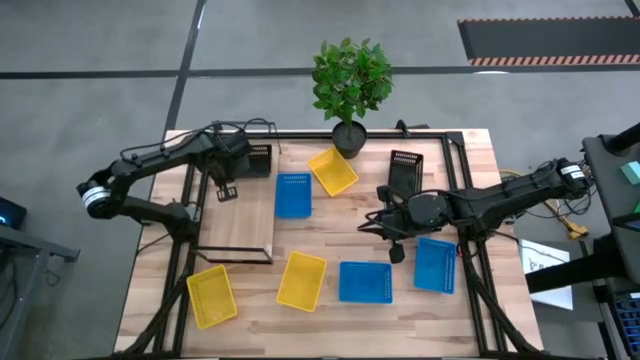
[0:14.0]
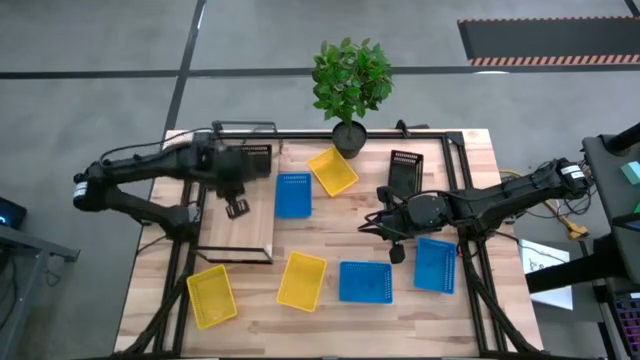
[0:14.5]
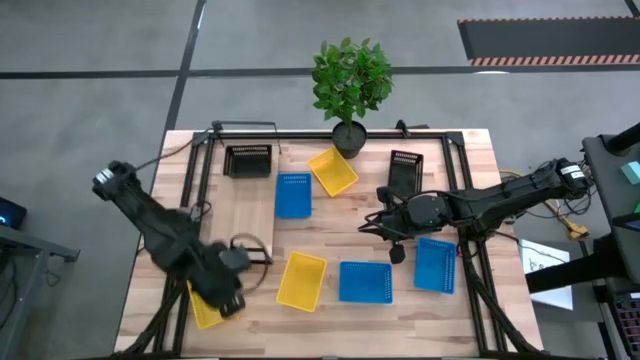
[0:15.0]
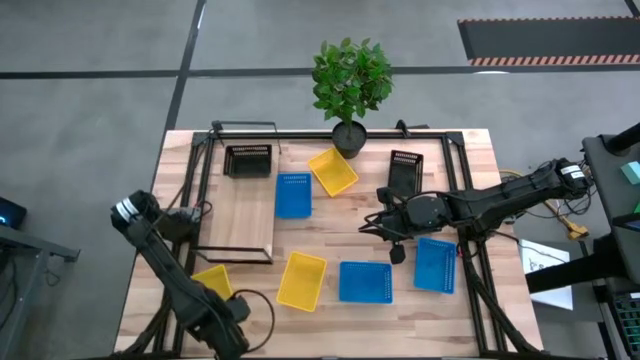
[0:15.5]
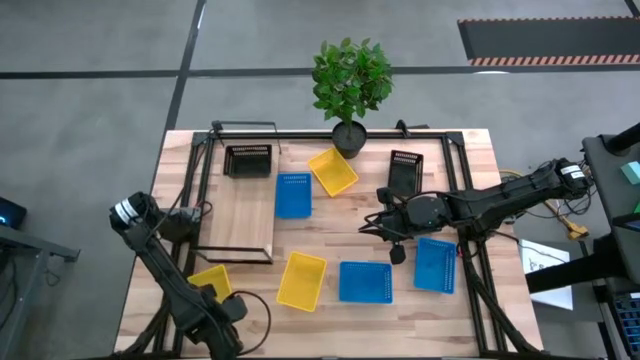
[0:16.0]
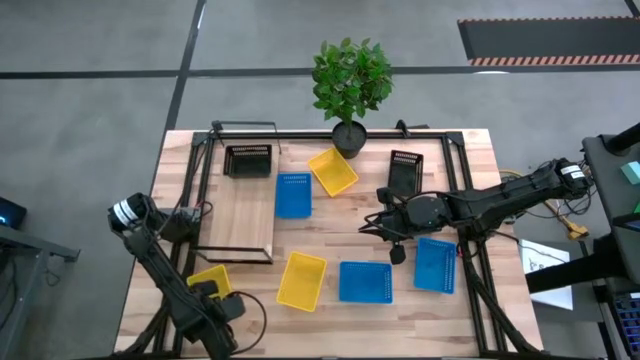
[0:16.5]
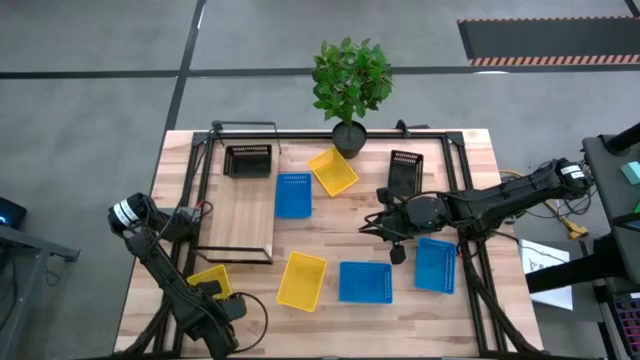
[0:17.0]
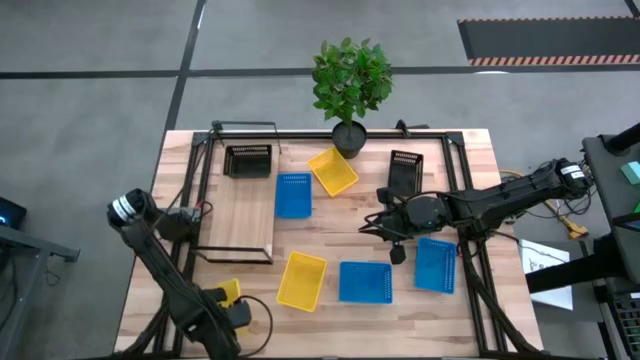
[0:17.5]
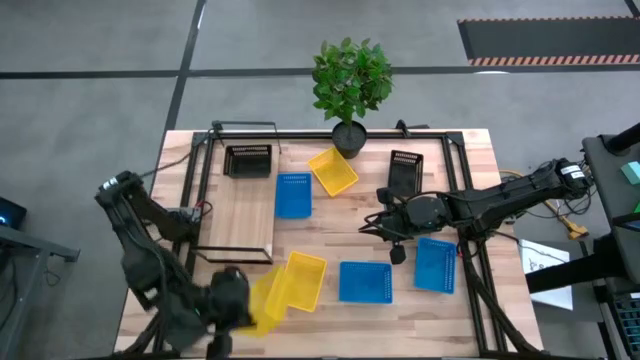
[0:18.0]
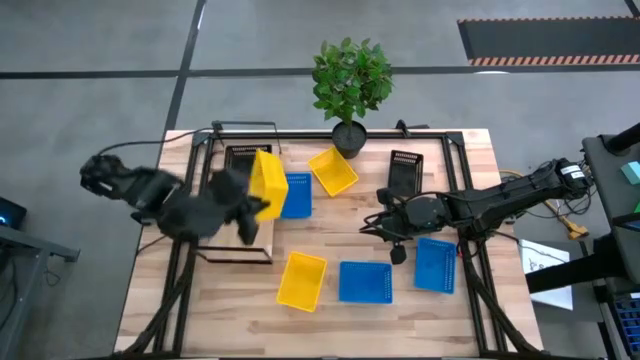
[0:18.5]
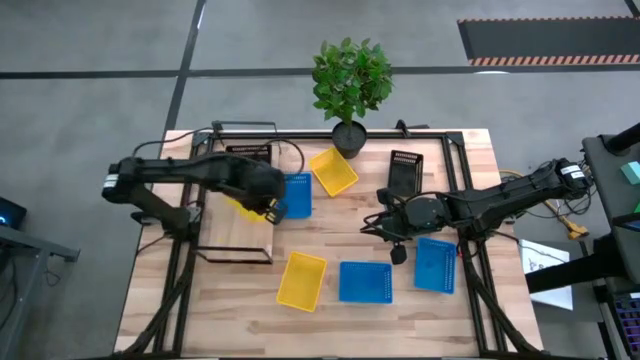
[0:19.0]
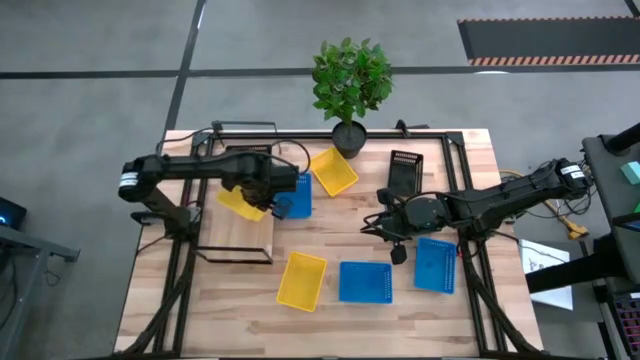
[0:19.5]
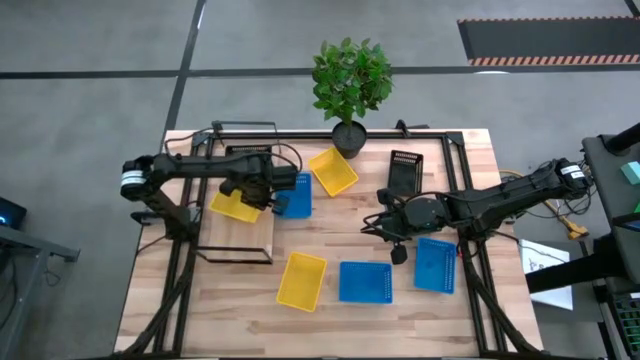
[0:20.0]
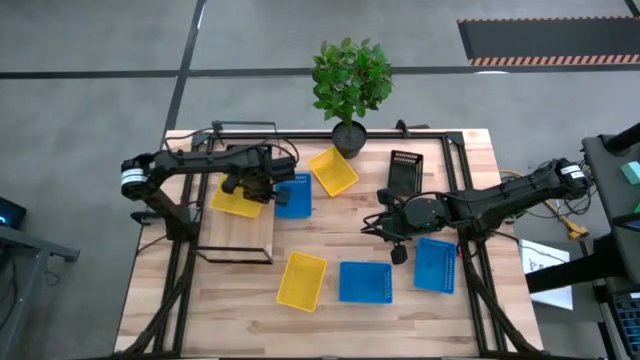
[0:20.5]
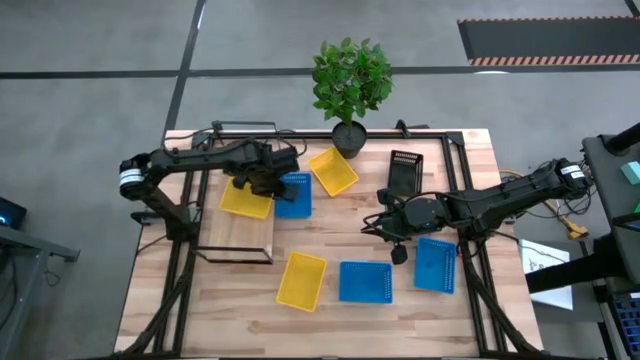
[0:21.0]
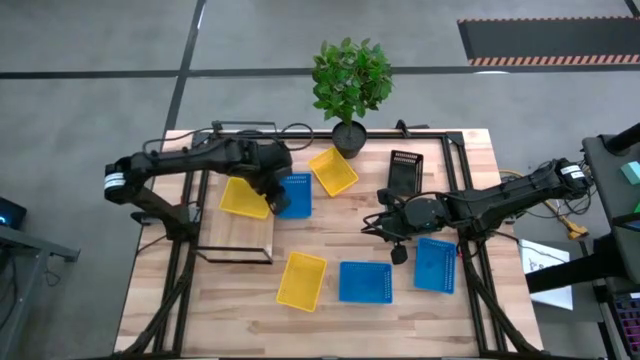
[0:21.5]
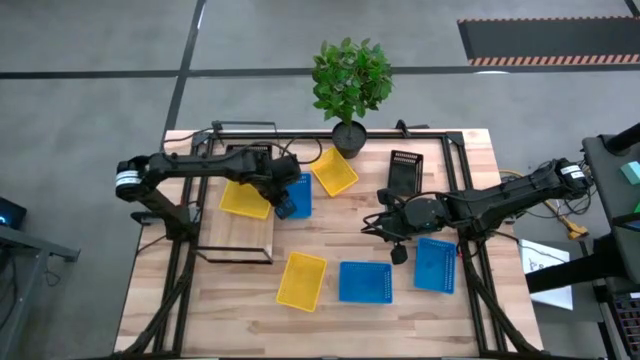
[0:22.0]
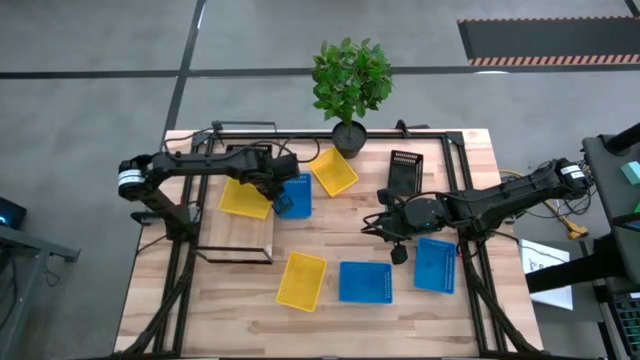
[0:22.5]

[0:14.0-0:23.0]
Put the bottom left yellow basket on the shelf

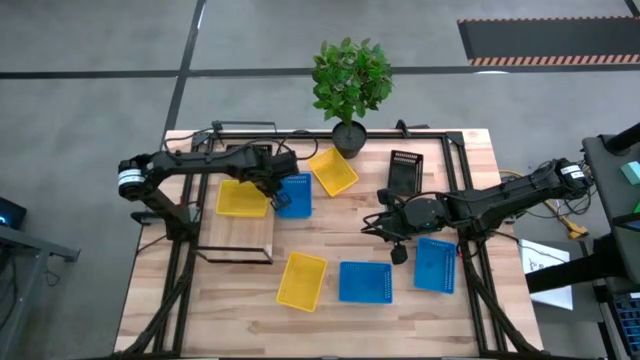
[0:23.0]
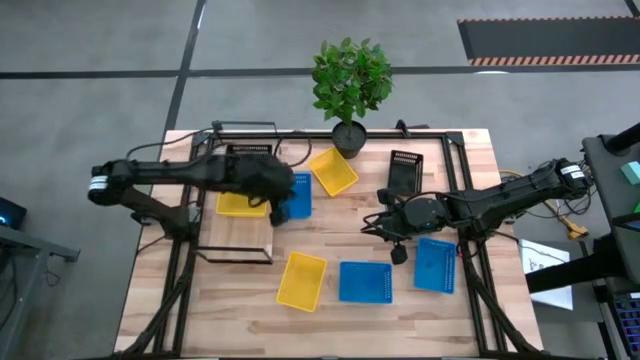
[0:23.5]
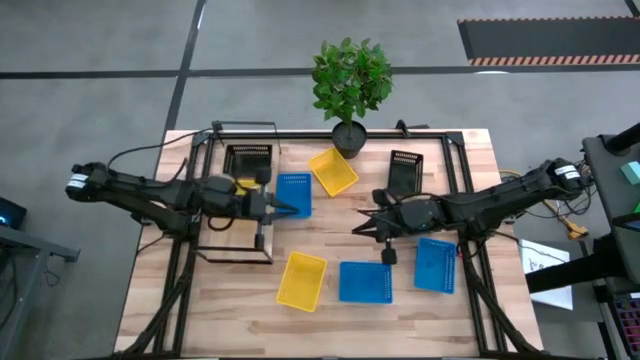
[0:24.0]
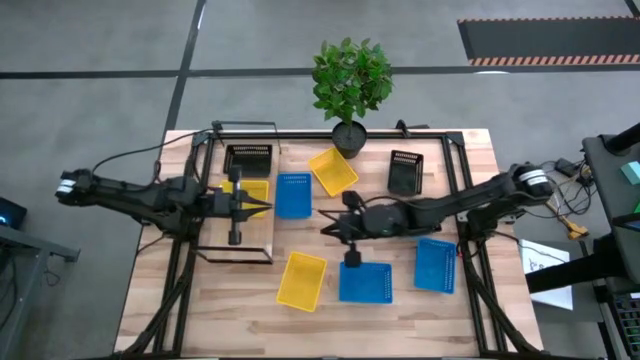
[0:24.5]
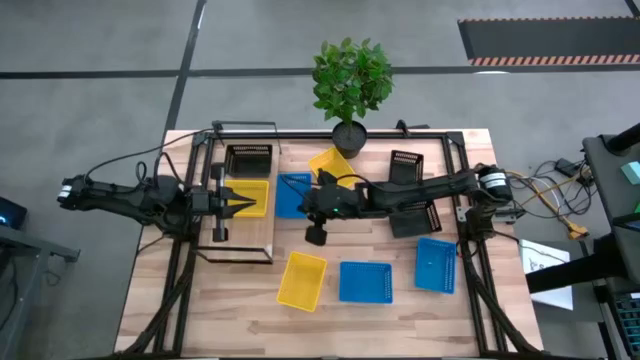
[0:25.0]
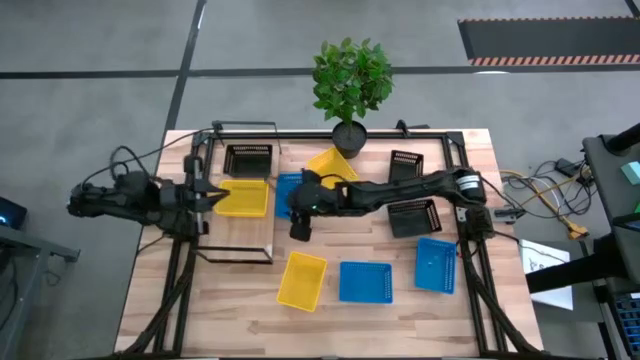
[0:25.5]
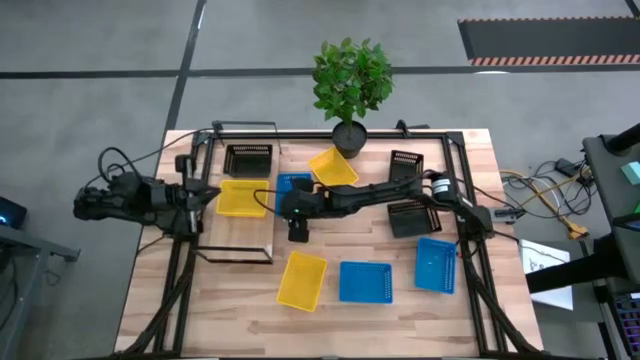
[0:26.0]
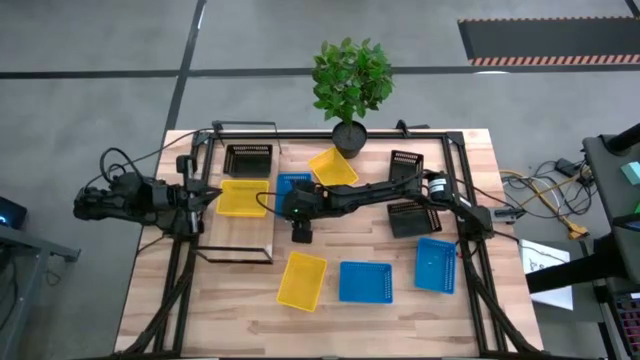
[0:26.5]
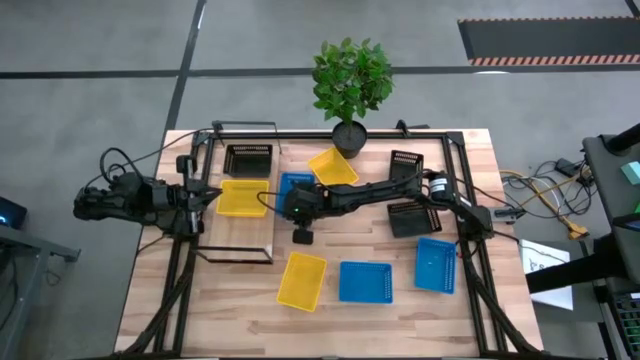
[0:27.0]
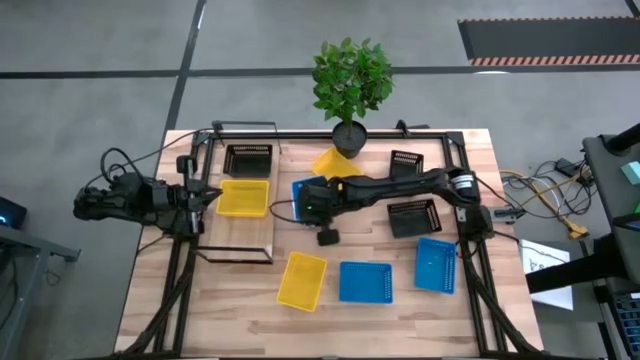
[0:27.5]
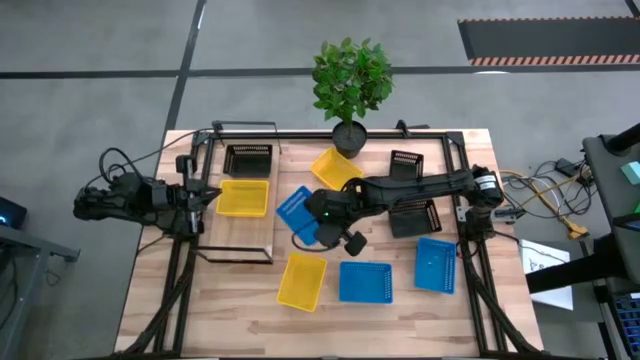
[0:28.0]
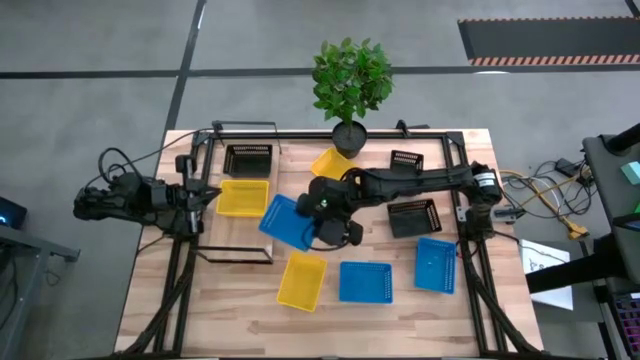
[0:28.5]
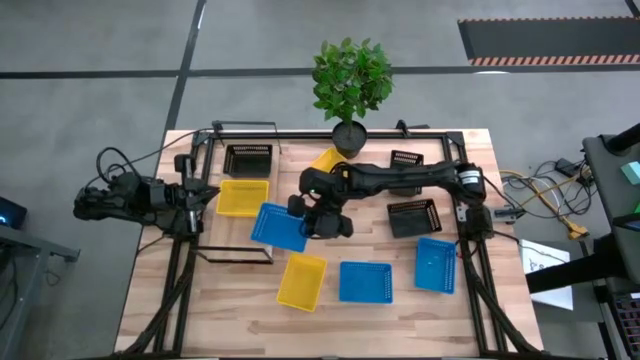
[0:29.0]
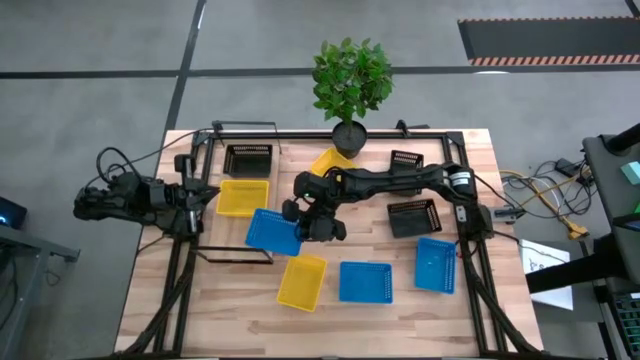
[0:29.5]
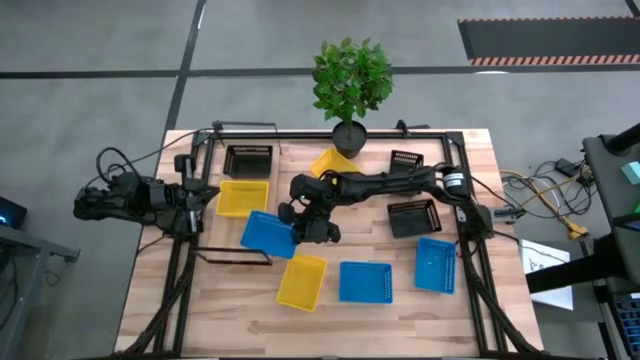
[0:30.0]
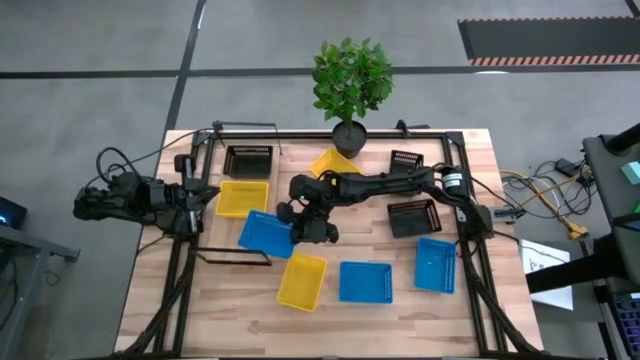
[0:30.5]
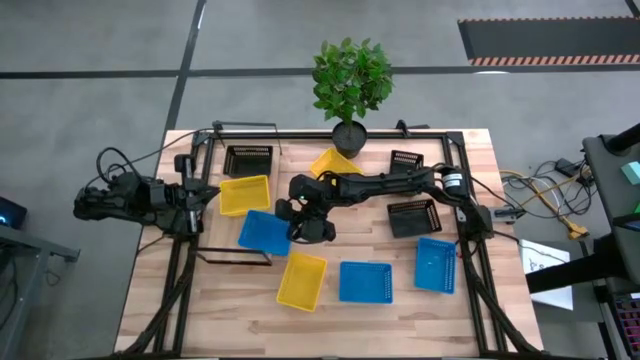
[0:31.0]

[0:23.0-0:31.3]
Put the top blue basket on the shelf
